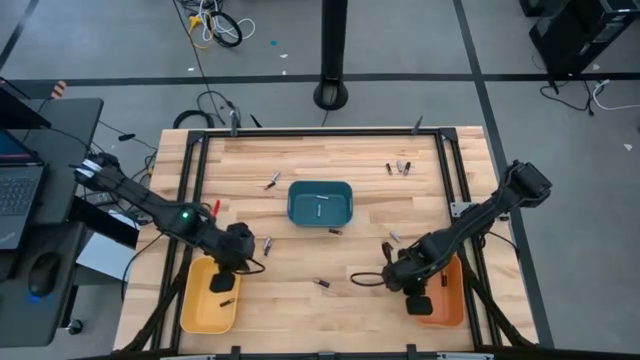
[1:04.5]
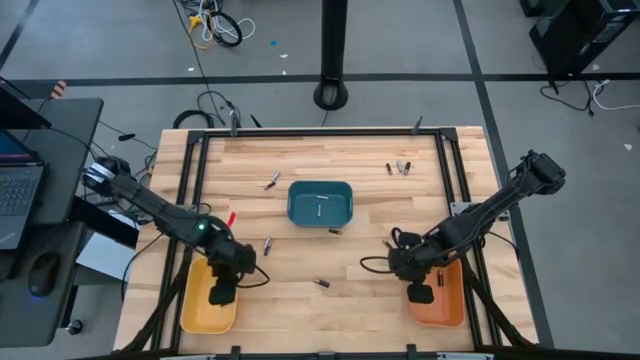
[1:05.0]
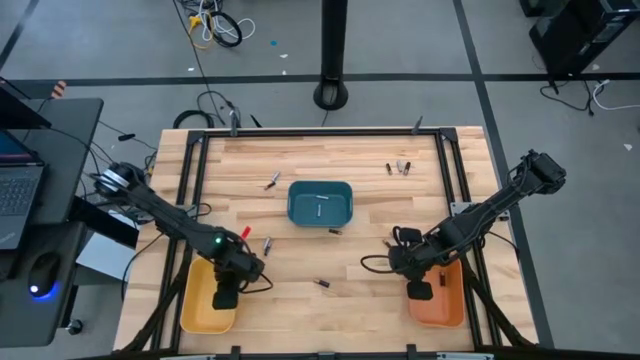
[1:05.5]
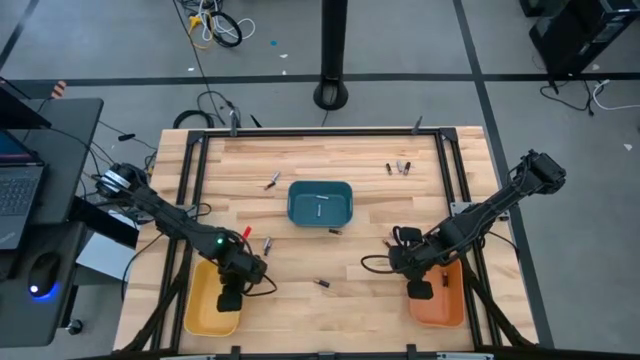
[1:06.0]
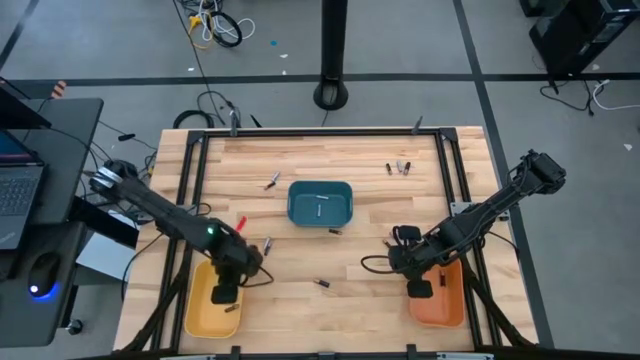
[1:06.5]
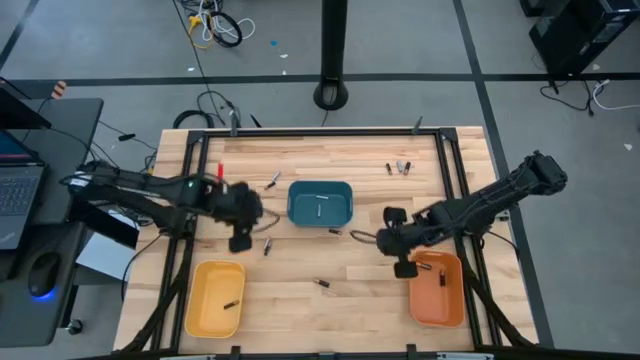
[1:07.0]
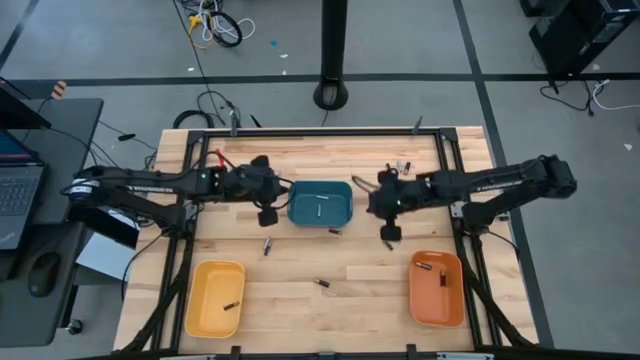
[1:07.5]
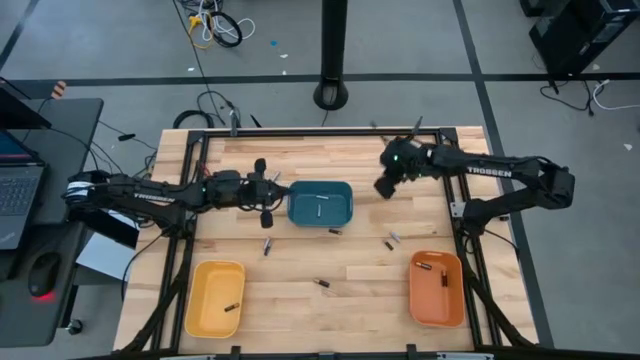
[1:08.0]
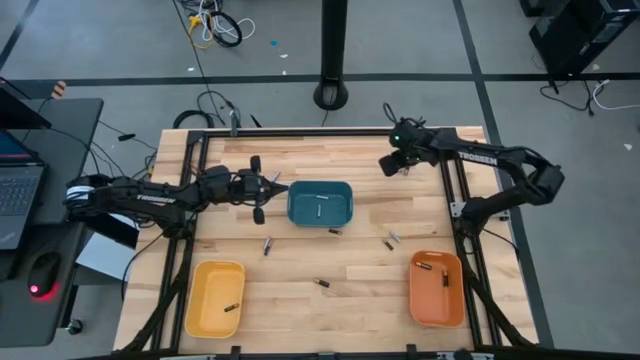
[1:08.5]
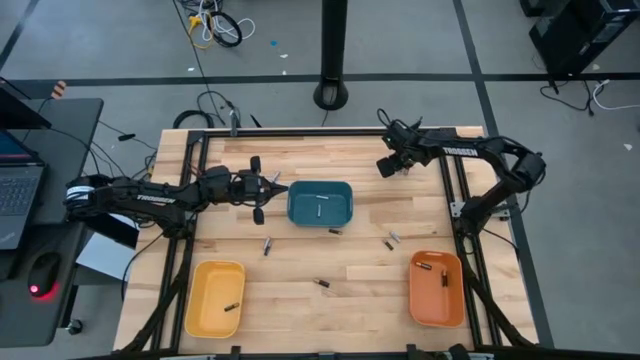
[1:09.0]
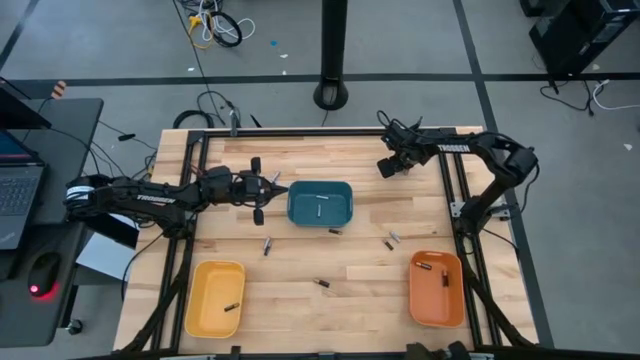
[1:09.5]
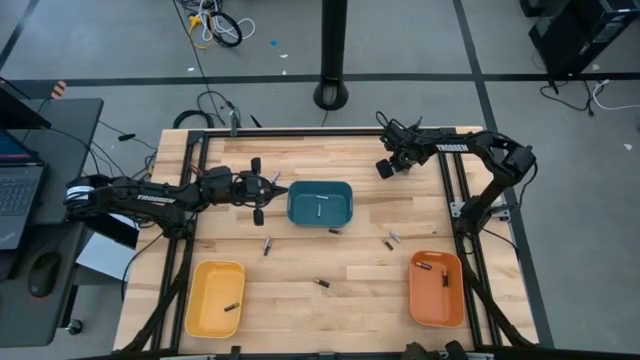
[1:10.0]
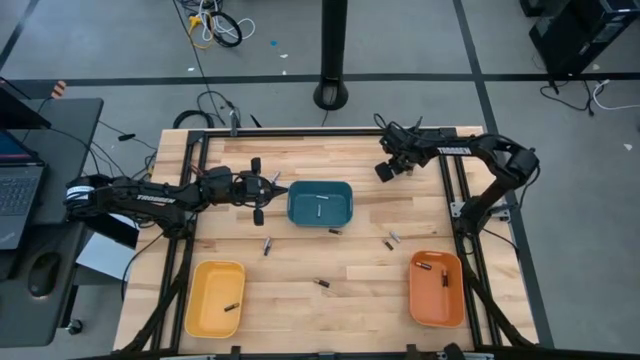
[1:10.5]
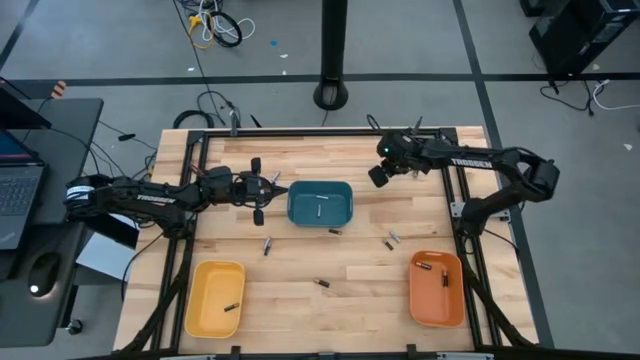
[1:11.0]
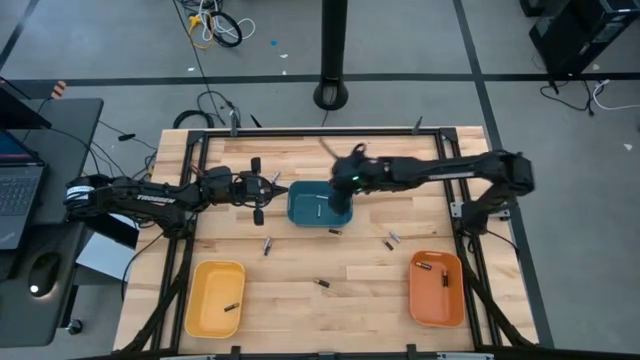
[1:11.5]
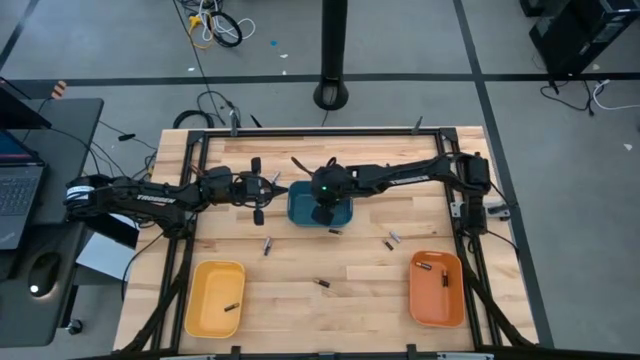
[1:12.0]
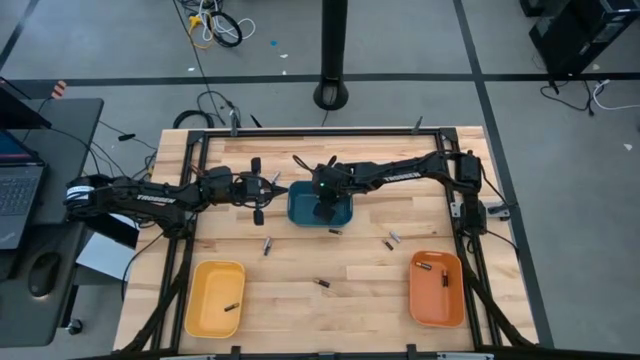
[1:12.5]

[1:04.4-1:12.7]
Task: Sort batteries
Put the silver battery into the blue bin

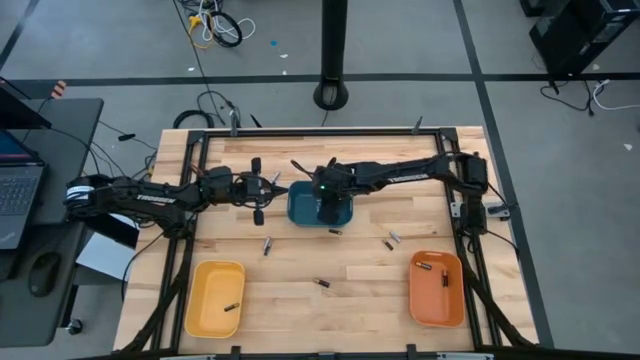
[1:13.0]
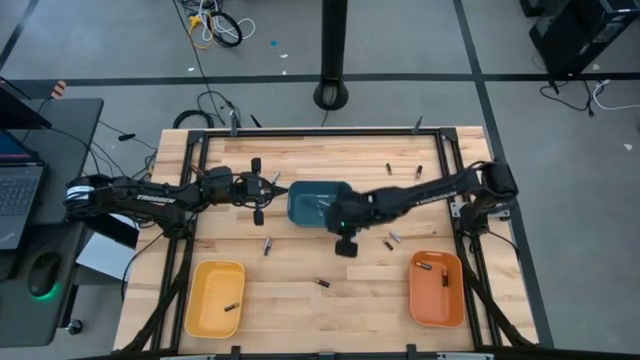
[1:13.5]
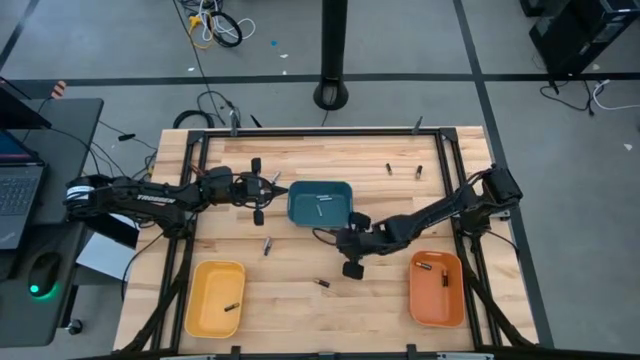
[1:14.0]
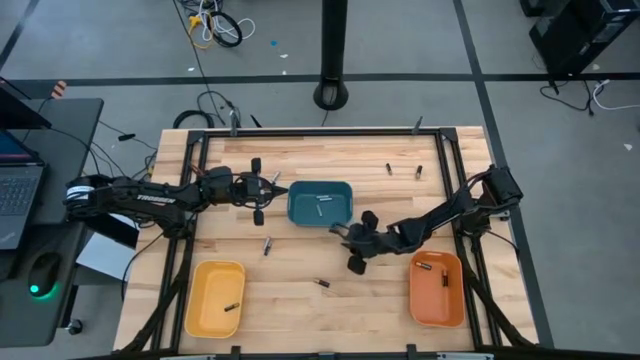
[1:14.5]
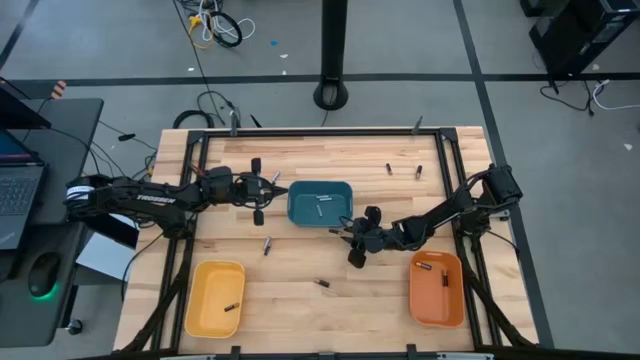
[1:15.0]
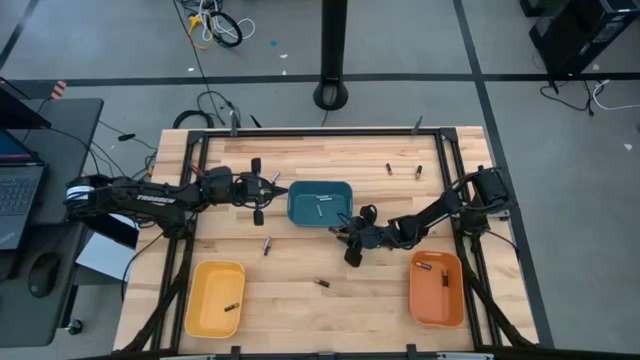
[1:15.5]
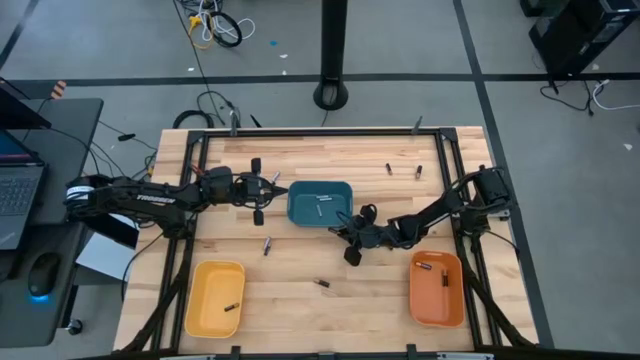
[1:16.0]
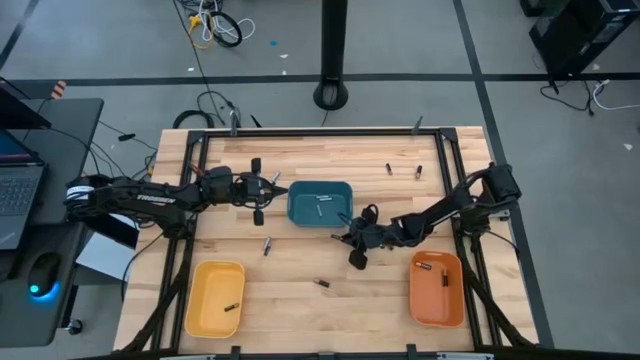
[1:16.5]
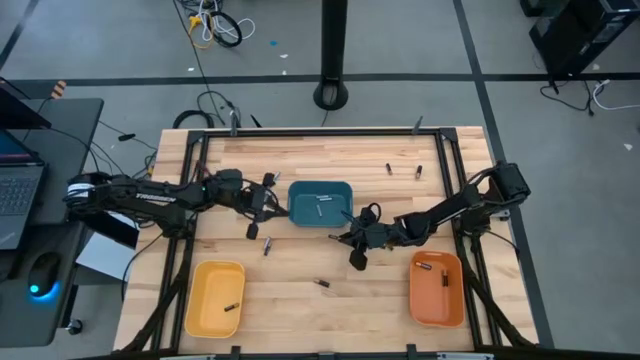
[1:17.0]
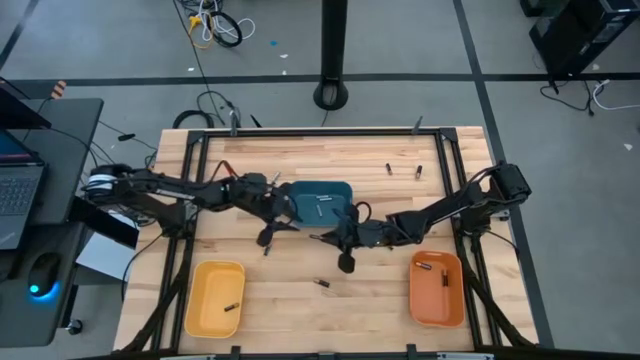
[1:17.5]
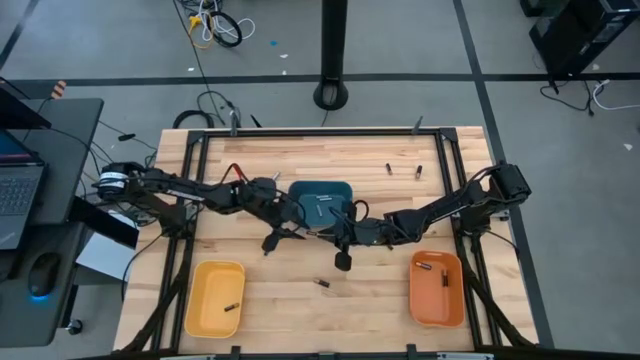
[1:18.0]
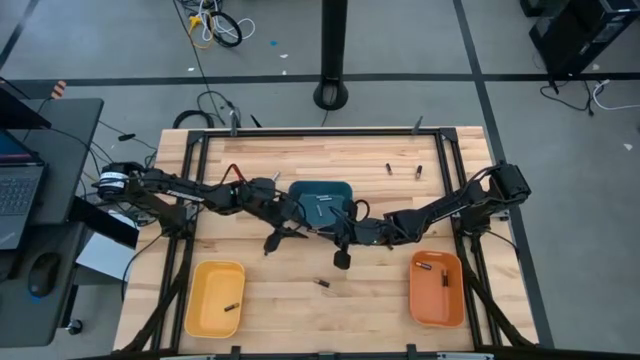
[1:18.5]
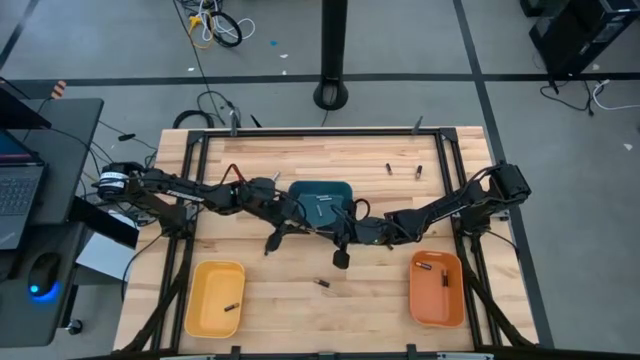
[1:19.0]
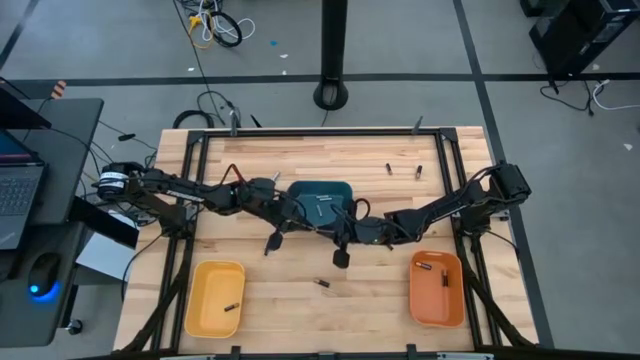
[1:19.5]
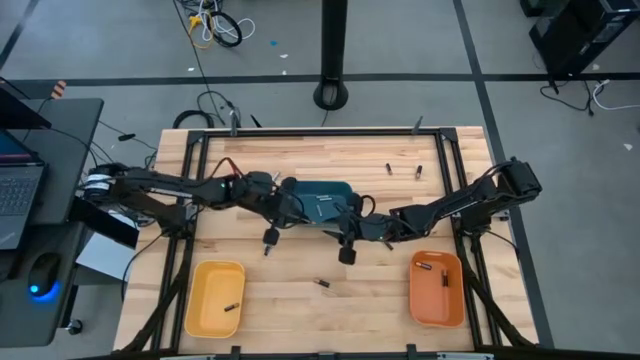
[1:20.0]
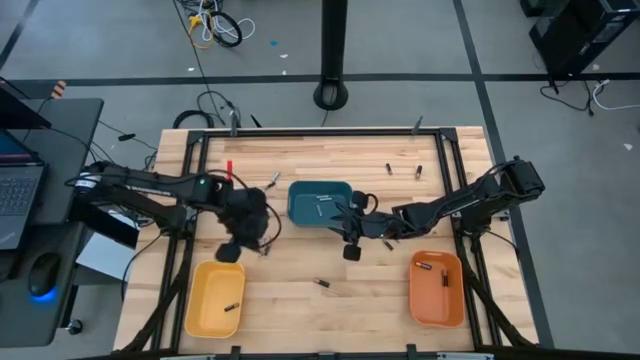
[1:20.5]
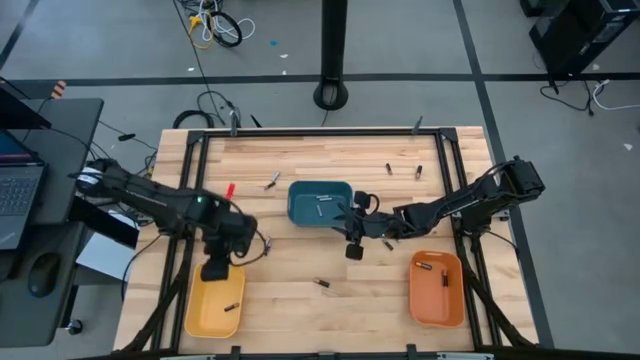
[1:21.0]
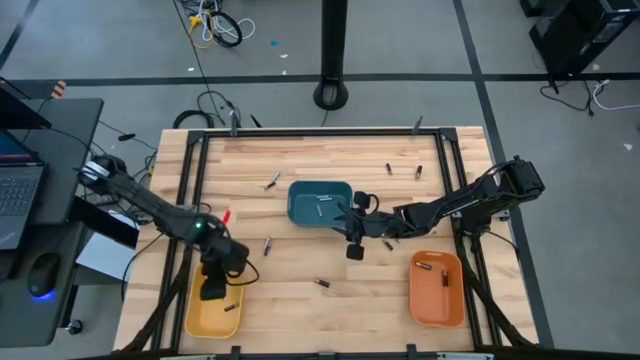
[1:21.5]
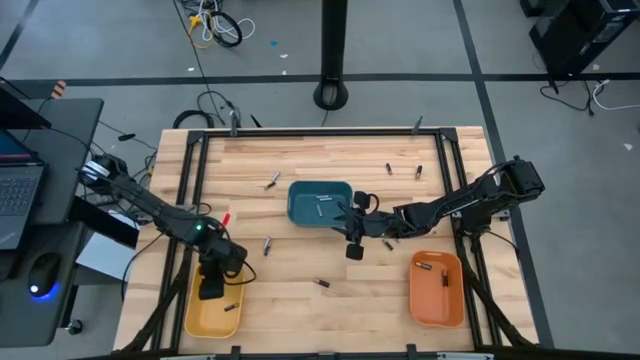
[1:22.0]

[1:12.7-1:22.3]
Put the black battery into the yellow bin

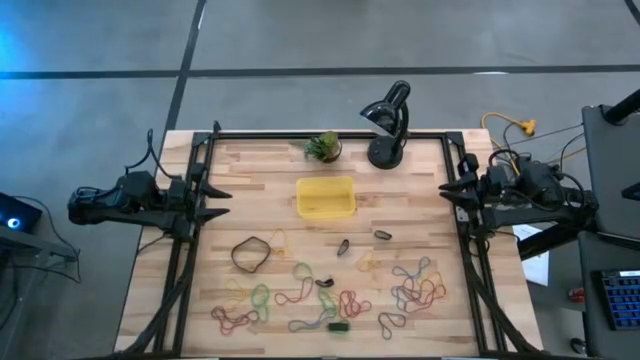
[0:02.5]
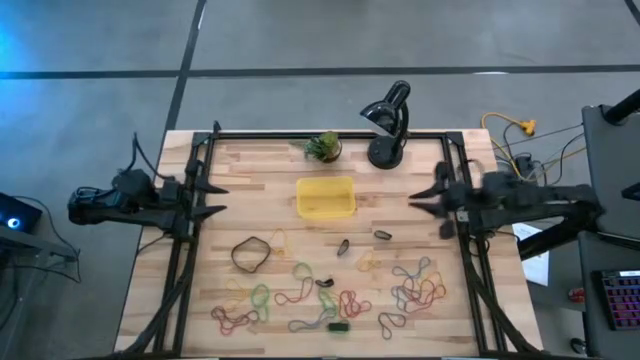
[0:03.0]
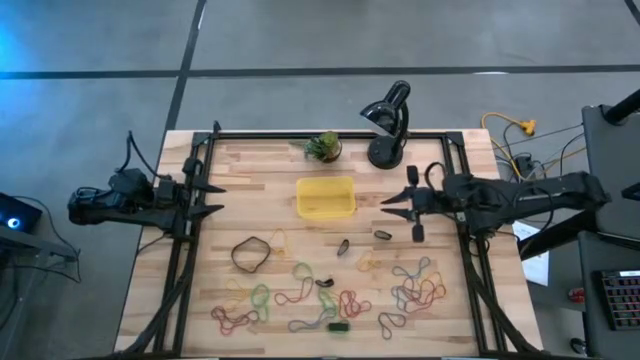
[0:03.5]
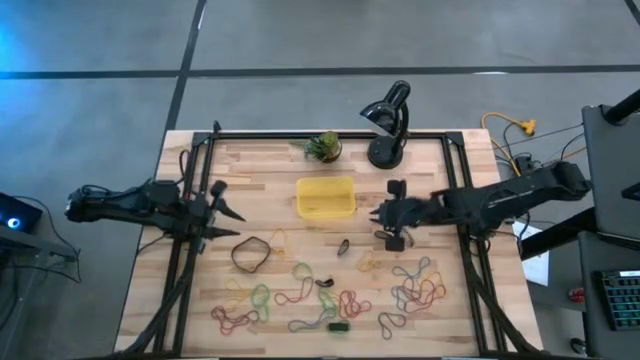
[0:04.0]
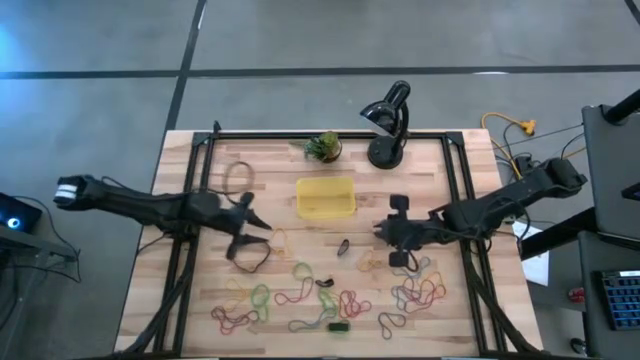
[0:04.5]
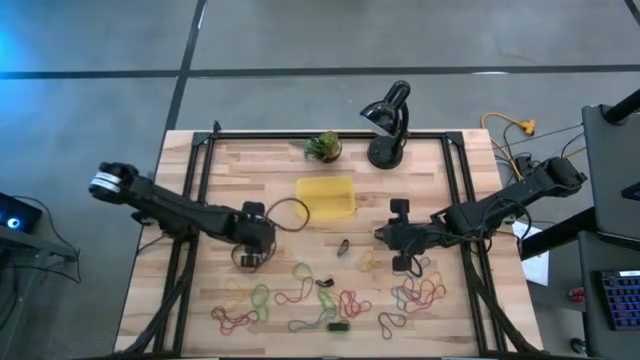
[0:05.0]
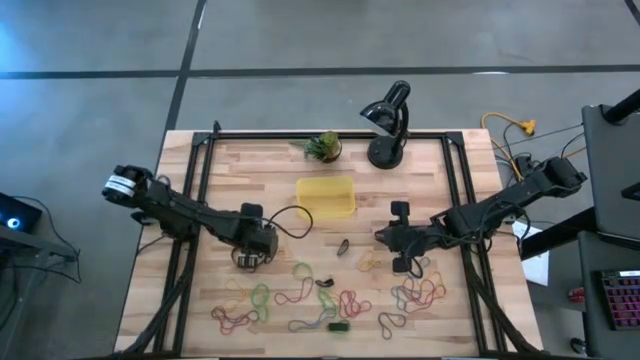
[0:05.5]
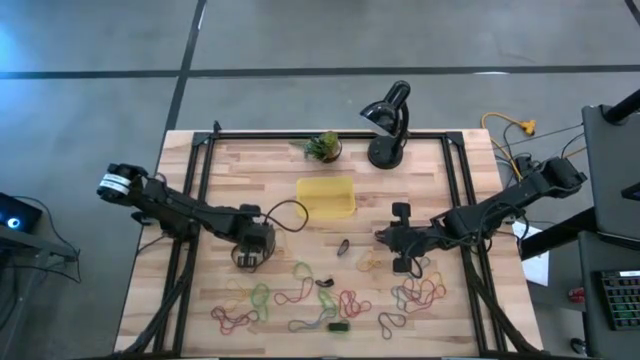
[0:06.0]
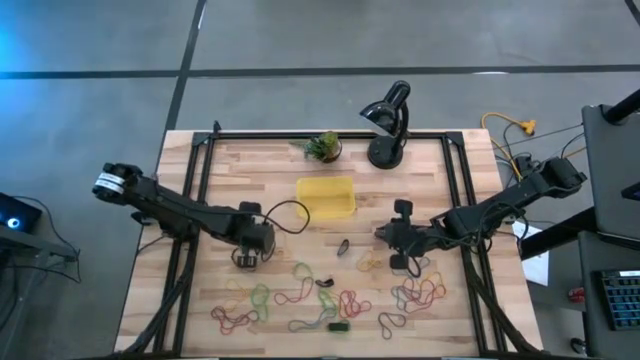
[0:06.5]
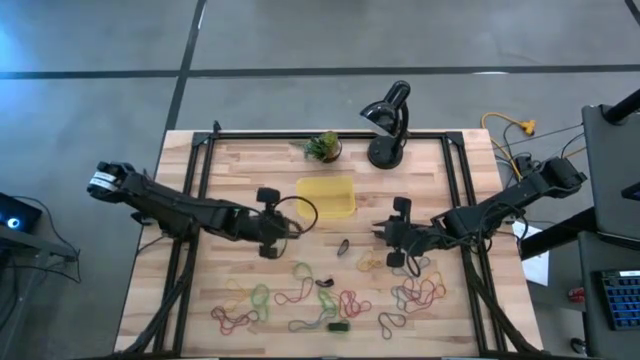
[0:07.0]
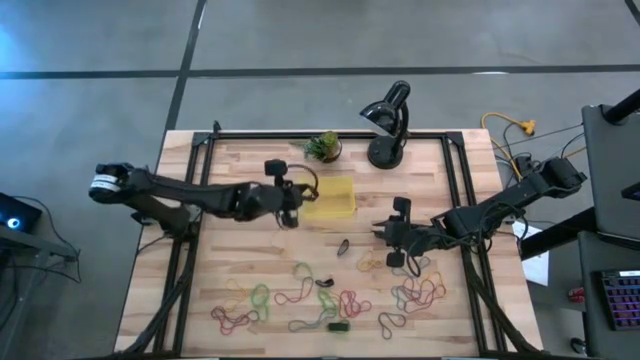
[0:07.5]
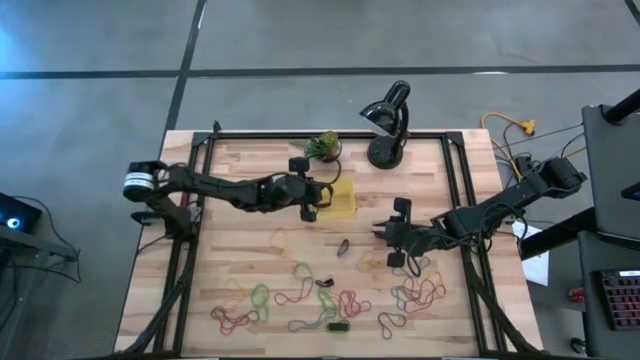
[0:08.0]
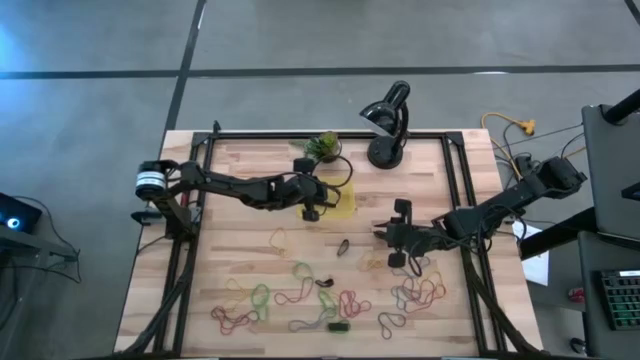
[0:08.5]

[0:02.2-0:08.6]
Task: Pick and place rubber bands into bin
Put the black rubber band in the yellow bin
